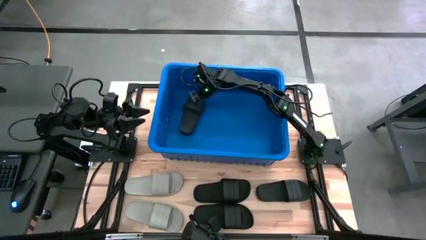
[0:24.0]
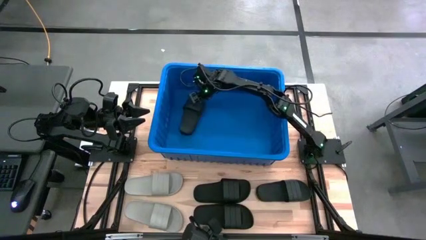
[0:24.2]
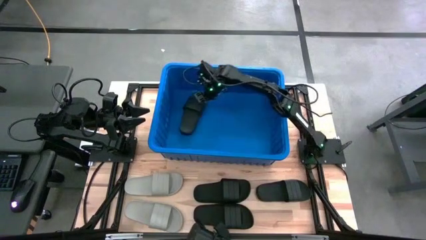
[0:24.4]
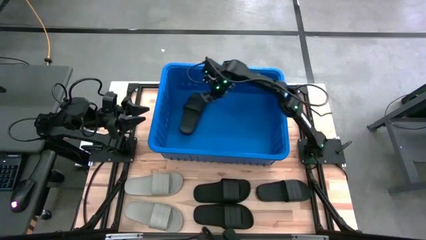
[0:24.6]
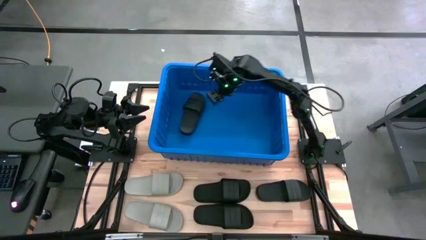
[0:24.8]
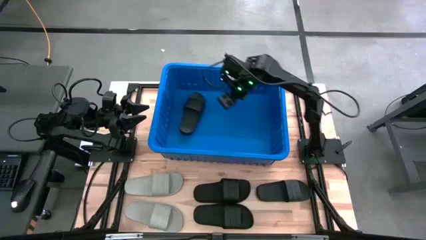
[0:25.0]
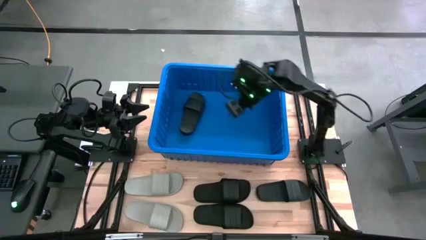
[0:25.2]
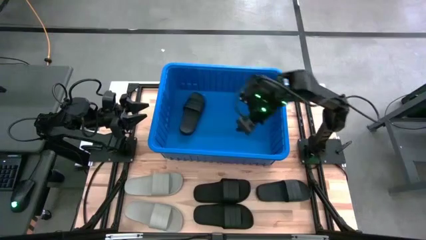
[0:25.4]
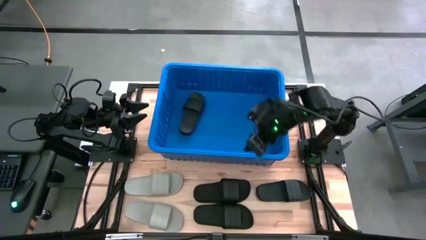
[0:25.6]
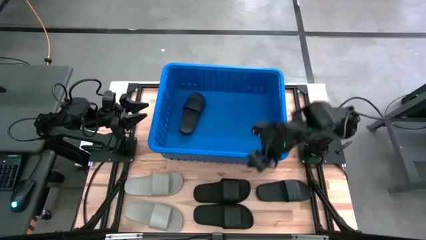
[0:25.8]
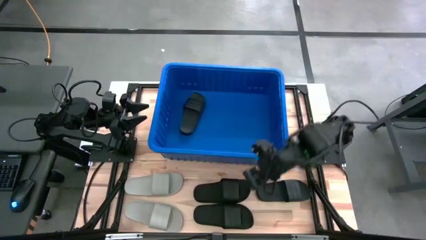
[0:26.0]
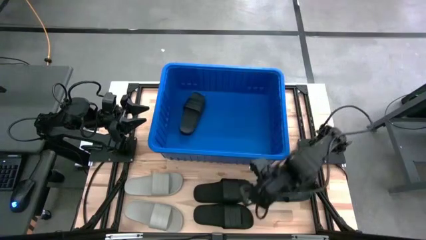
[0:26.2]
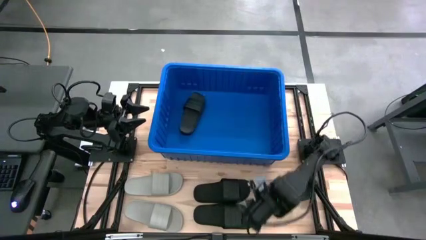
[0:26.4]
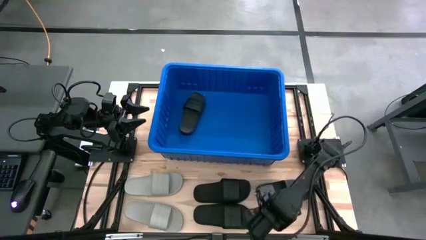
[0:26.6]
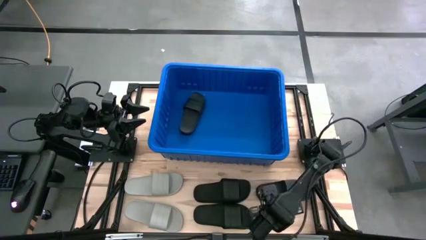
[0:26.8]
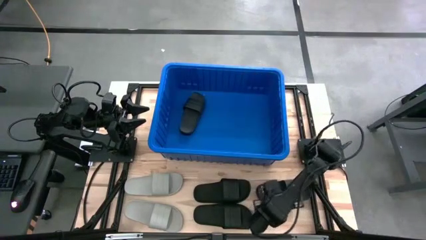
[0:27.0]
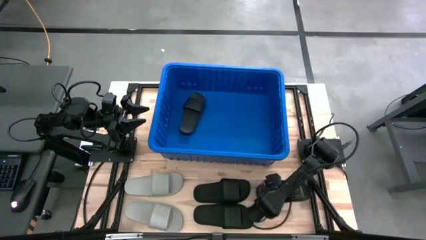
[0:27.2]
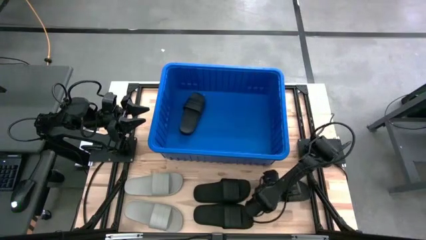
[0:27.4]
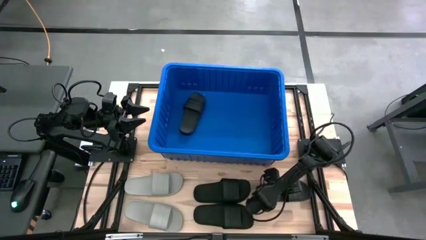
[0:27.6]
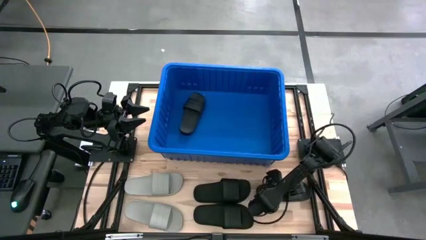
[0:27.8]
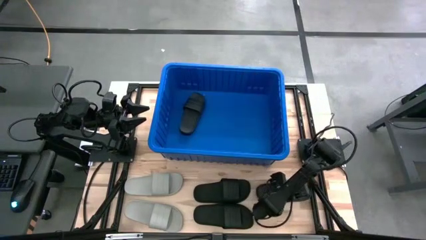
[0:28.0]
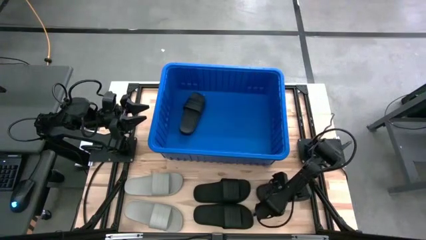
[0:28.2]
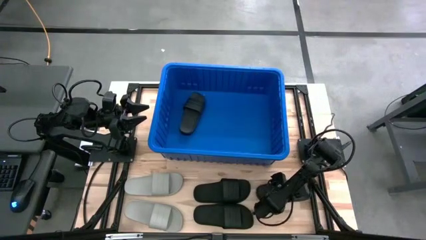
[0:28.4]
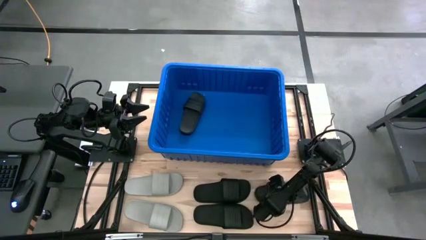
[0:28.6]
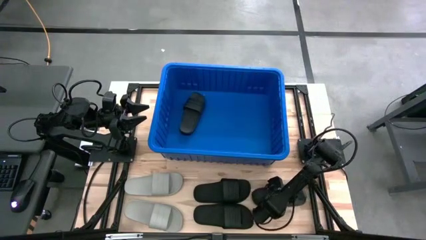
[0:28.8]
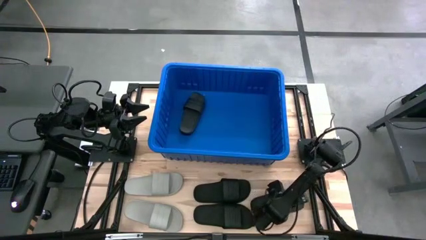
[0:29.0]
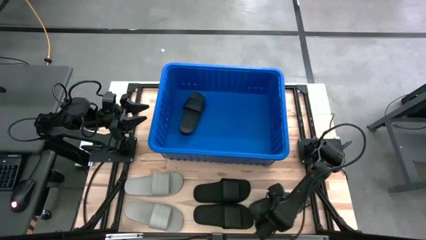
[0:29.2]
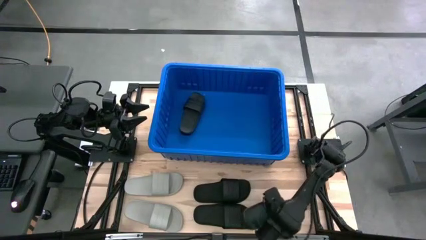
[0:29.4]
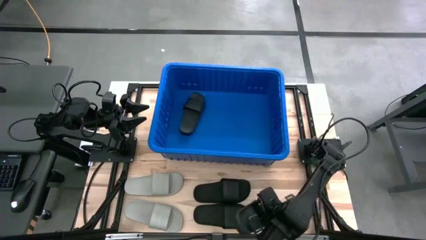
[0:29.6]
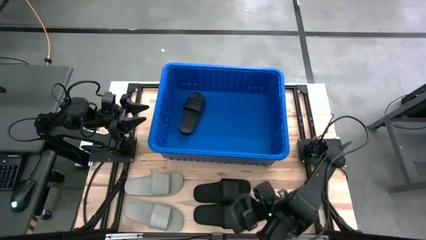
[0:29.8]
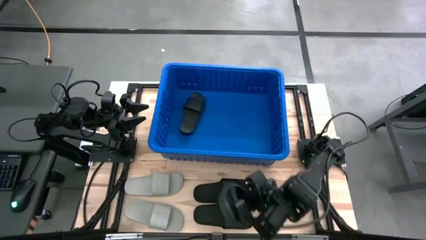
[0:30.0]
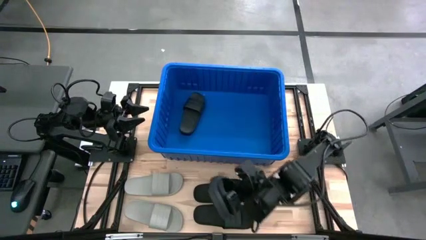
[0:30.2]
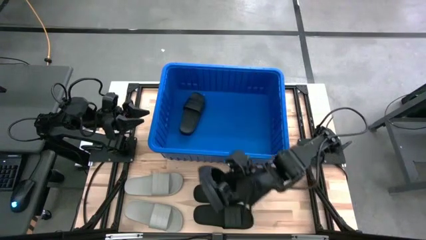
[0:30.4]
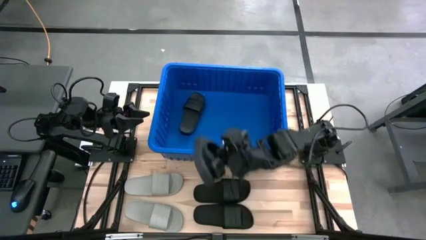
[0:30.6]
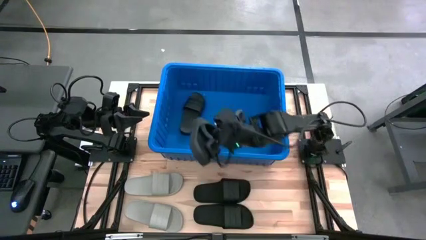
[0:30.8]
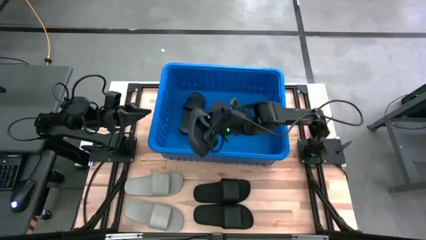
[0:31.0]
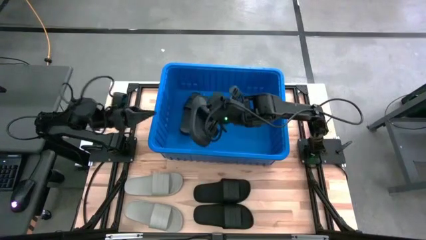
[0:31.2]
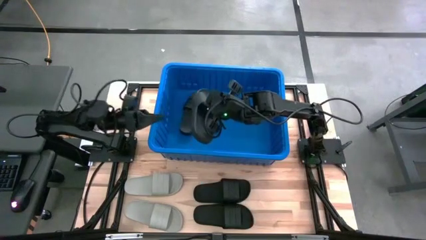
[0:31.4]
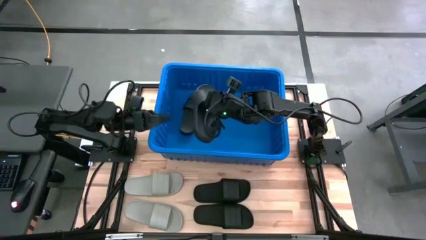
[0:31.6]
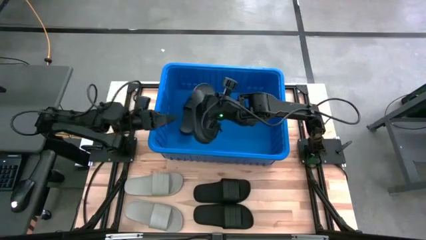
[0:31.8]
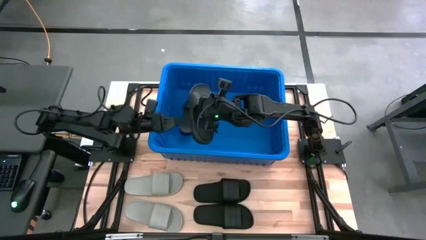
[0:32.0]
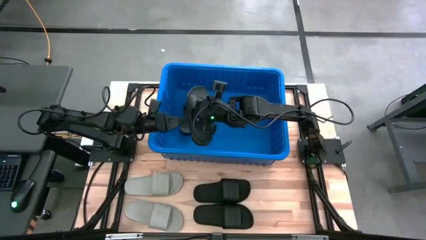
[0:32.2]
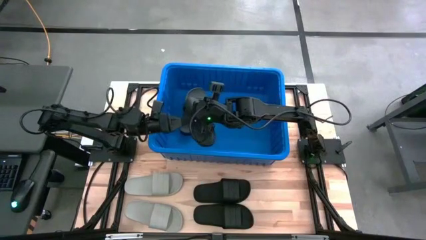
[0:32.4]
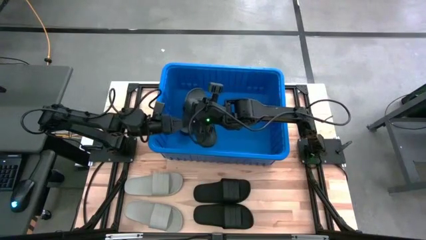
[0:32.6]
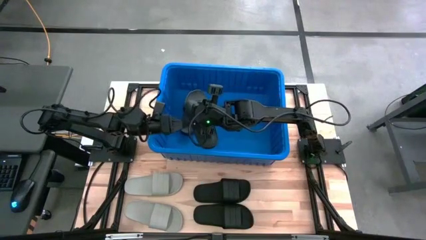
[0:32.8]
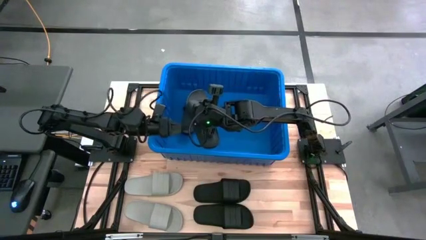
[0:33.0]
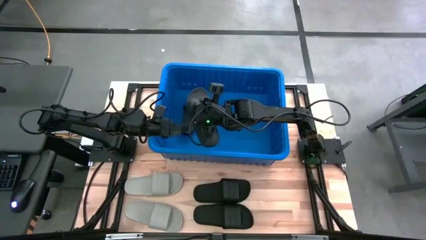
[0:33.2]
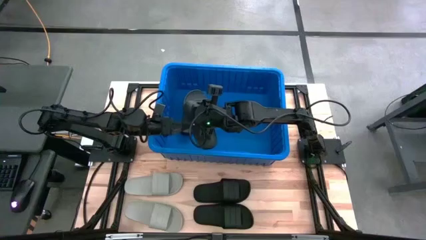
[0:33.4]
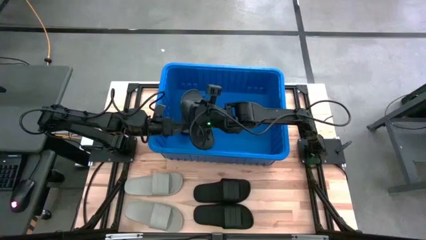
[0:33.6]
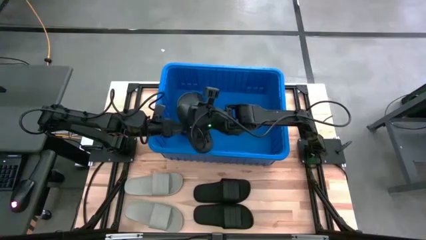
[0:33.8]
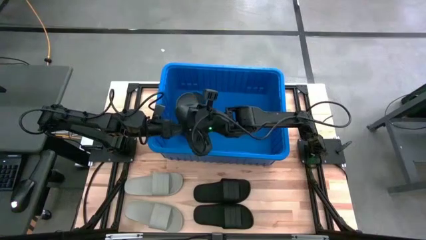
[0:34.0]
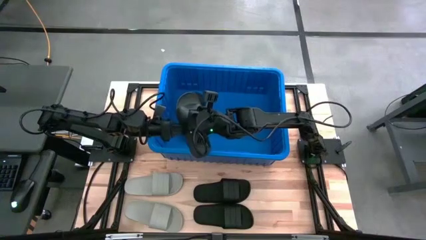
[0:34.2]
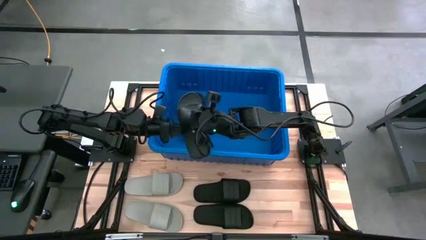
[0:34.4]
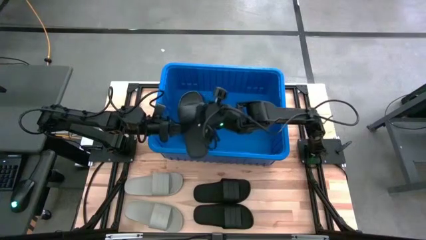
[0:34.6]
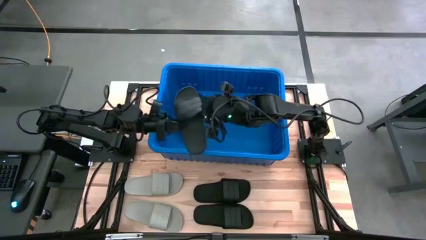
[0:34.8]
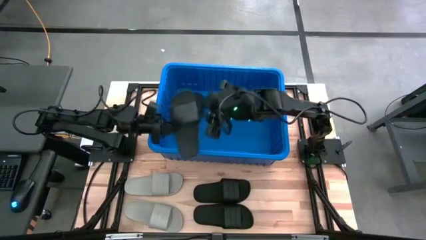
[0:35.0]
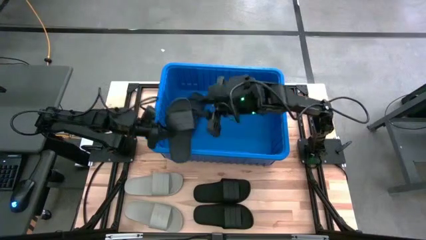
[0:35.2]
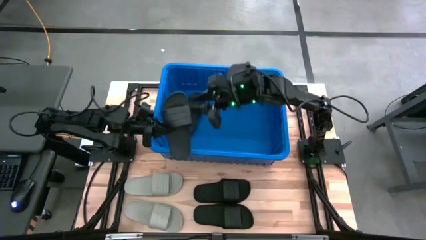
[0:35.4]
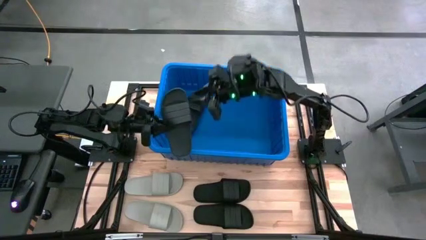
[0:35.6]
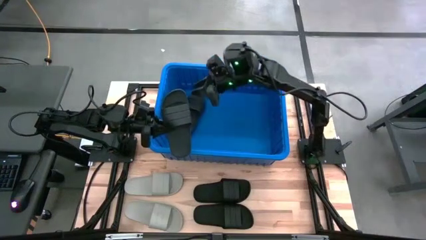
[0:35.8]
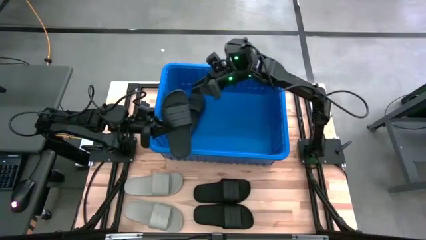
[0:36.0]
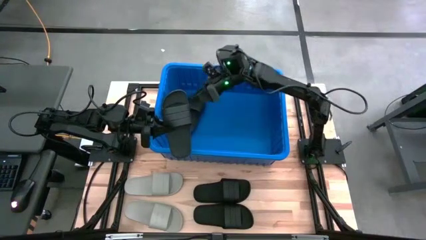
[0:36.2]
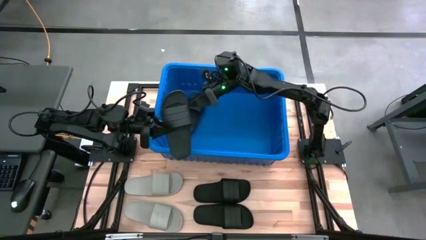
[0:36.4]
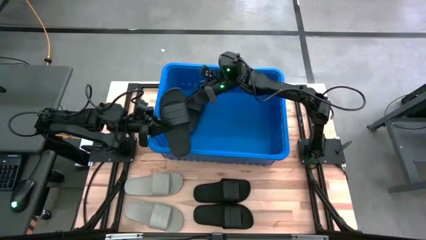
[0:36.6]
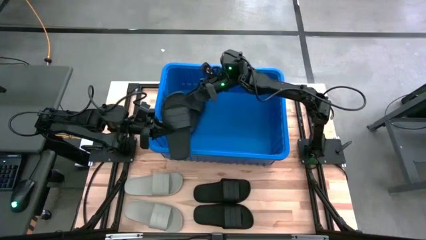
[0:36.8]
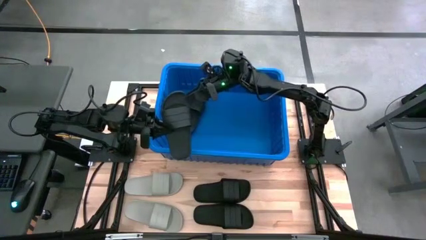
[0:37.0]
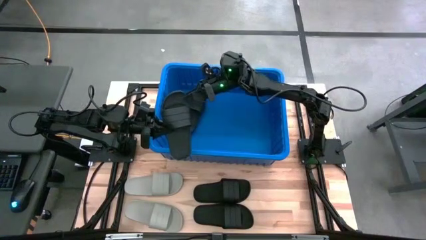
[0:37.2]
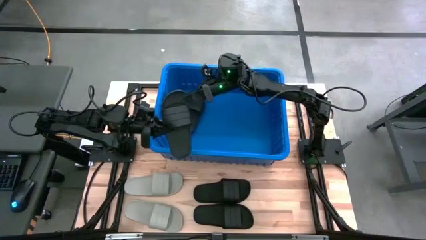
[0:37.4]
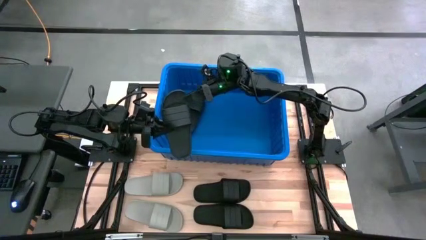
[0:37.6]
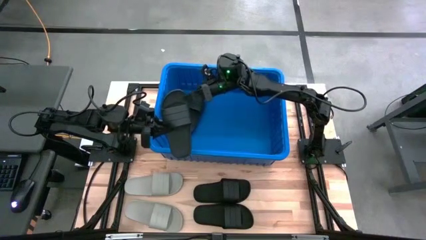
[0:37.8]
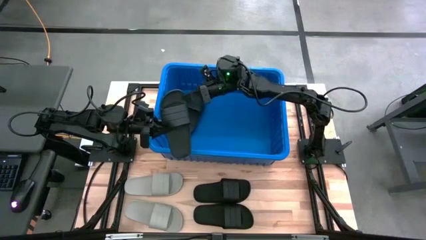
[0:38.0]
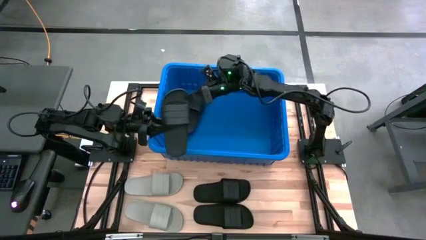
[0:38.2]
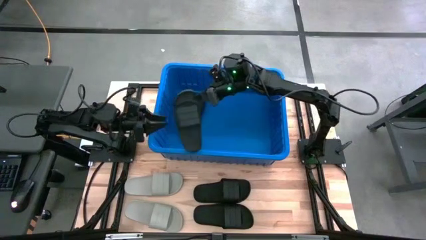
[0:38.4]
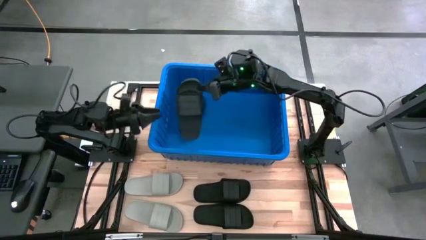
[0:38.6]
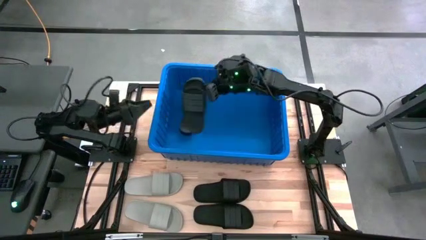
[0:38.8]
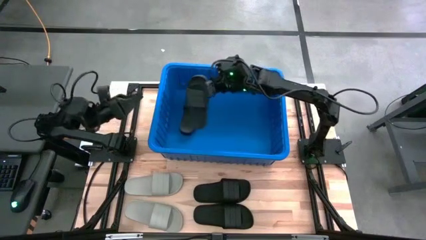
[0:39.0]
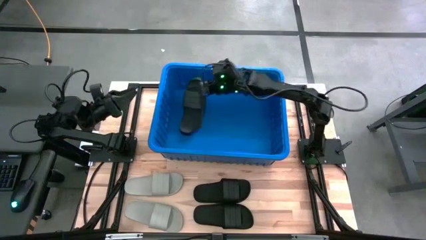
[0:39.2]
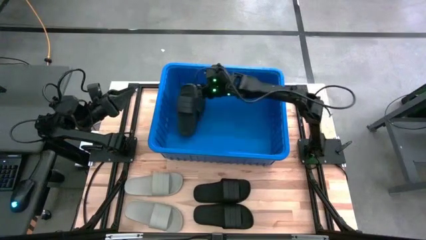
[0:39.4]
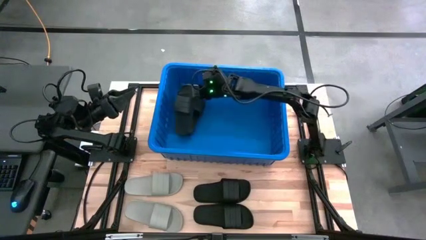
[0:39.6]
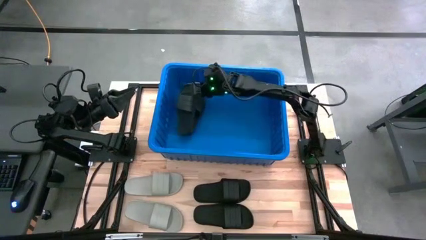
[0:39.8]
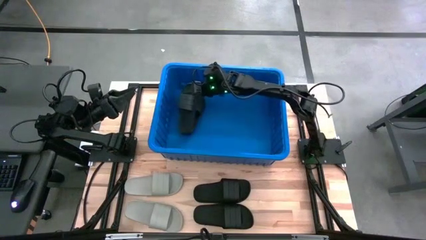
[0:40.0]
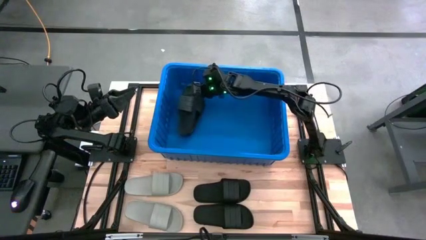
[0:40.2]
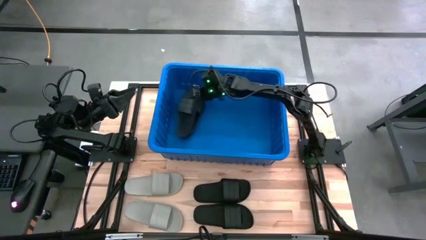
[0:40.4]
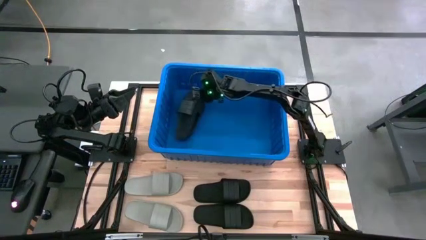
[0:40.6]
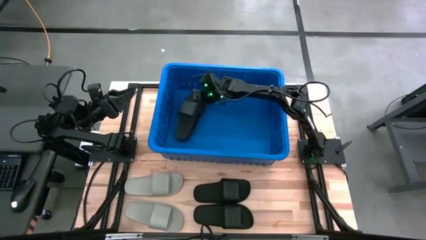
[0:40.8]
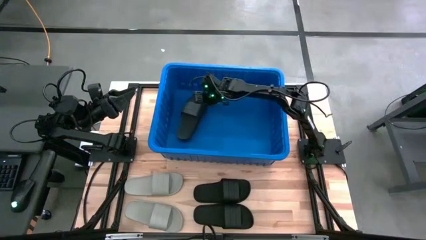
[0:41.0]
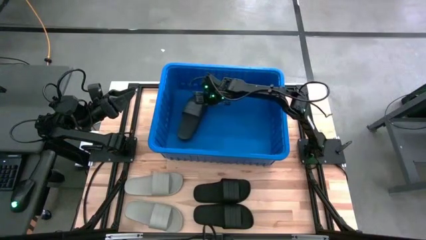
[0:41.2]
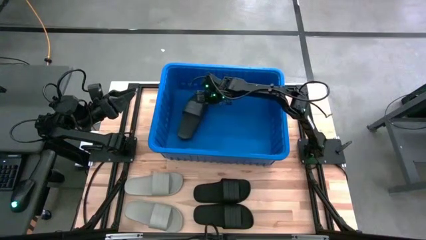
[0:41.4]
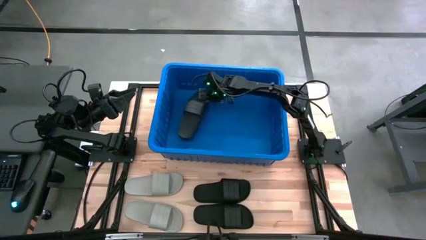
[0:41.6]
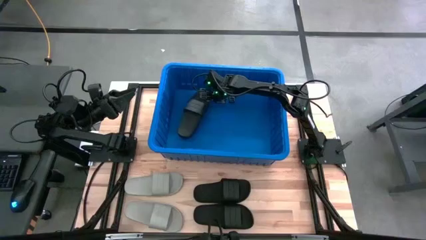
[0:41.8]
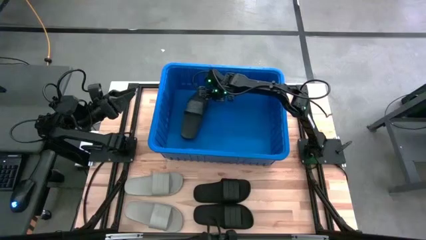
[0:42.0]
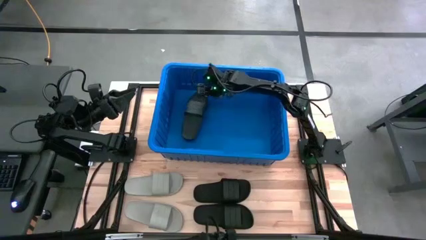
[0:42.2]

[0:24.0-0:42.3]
Task: Pick and place slides into bin
Put the top right black slide into the blue bin
